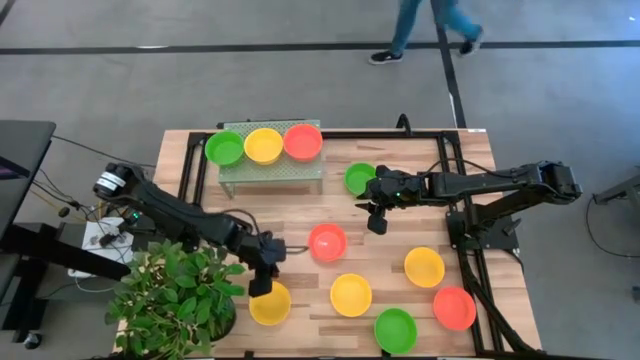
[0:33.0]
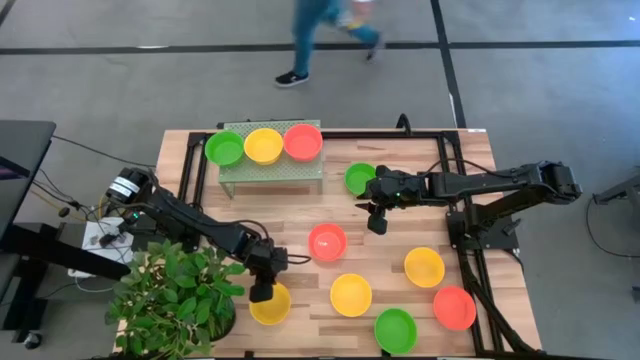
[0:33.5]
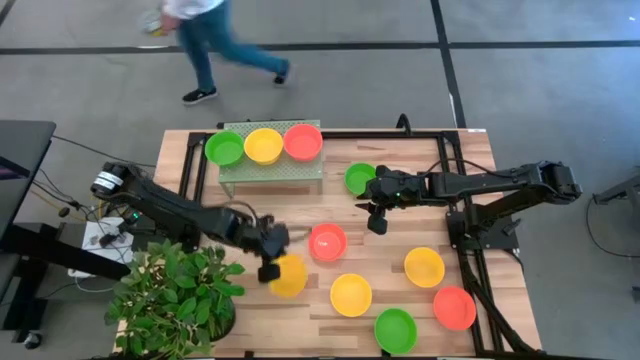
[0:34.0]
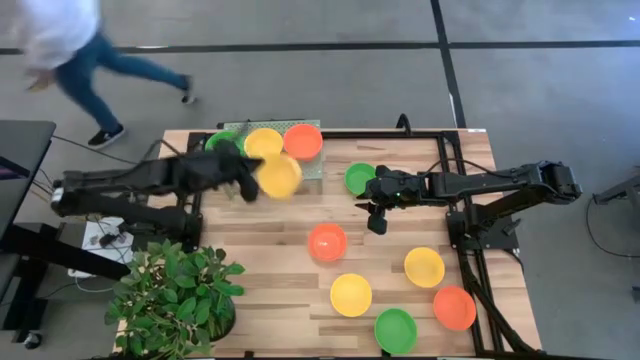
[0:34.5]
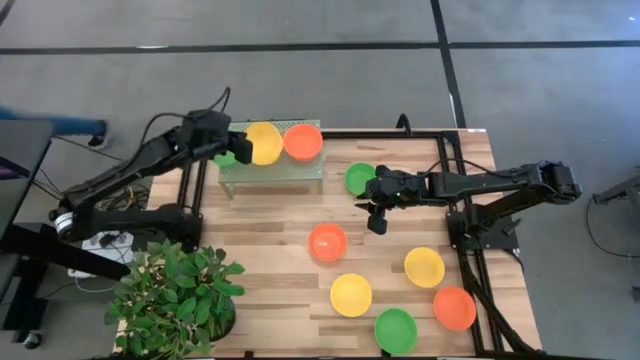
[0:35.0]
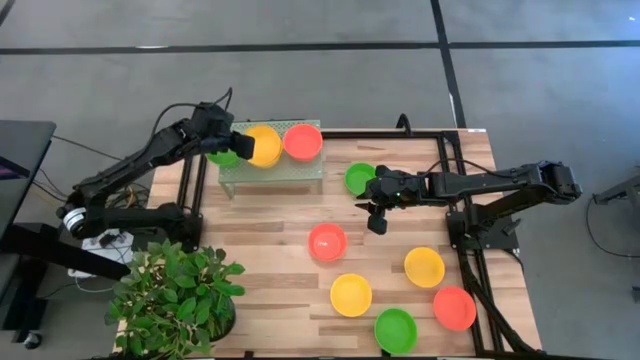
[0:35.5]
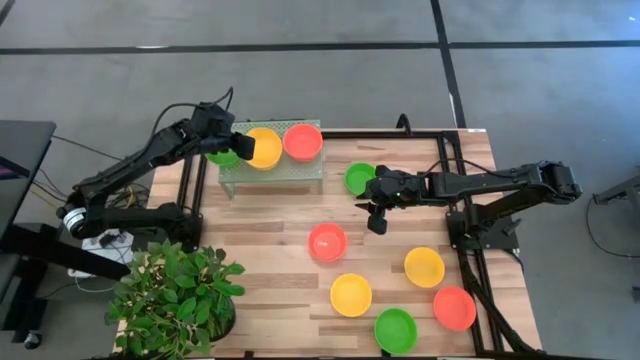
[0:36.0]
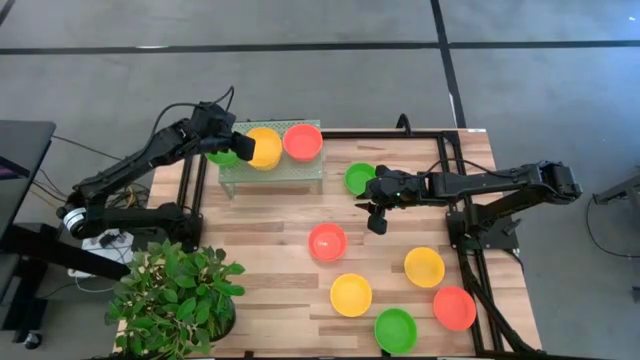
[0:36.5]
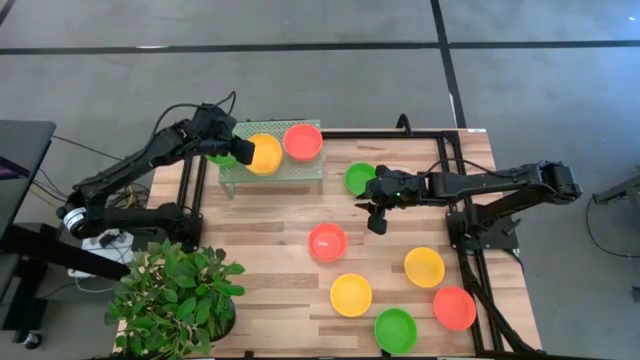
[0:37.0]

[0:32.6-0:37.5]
Task: Pick & Place Mini bowls
Stack the yellow bowl on top of the yellow bowl on the shelf

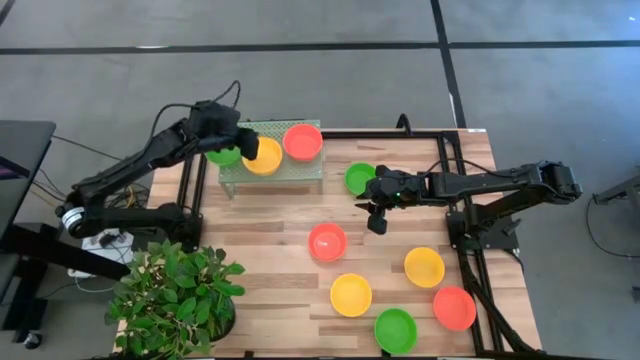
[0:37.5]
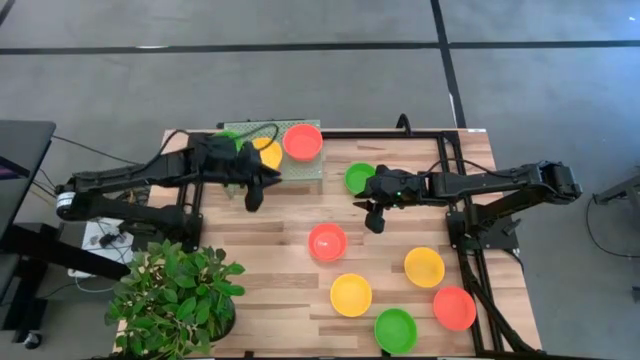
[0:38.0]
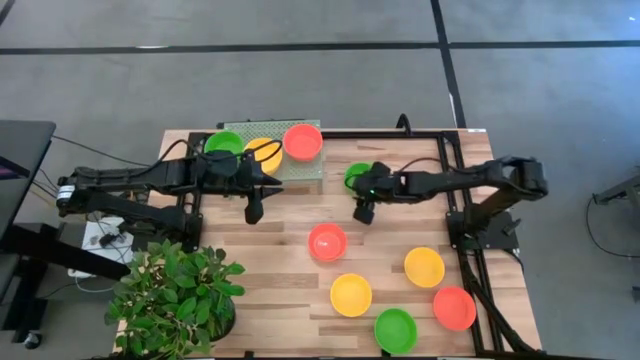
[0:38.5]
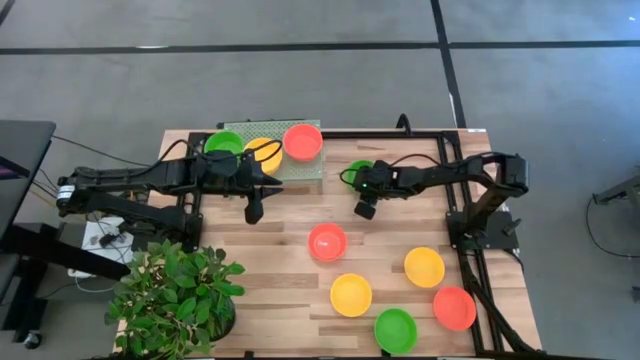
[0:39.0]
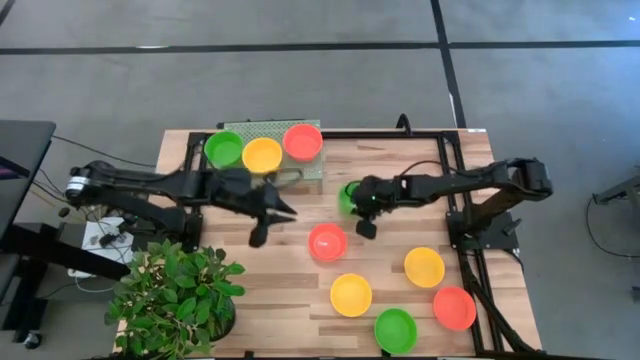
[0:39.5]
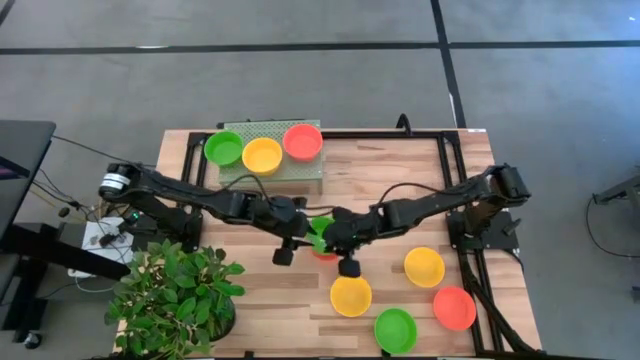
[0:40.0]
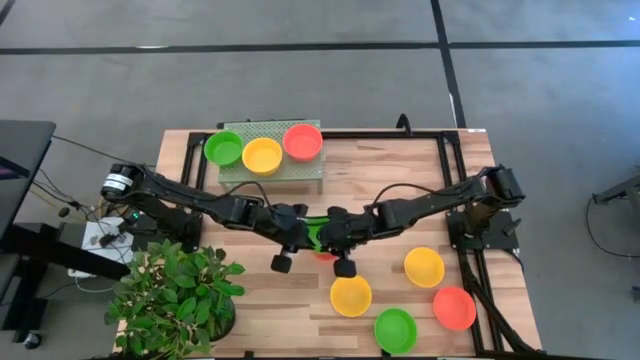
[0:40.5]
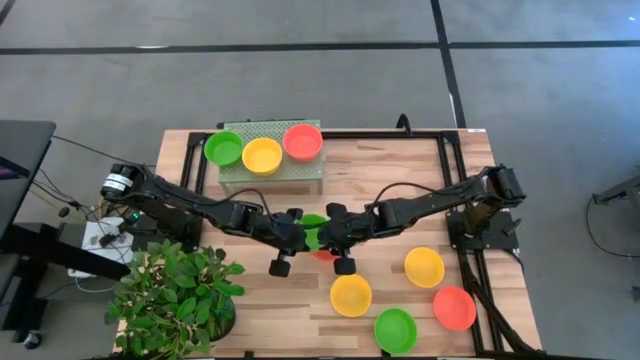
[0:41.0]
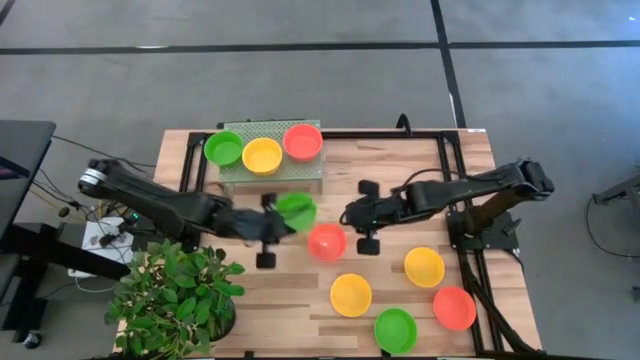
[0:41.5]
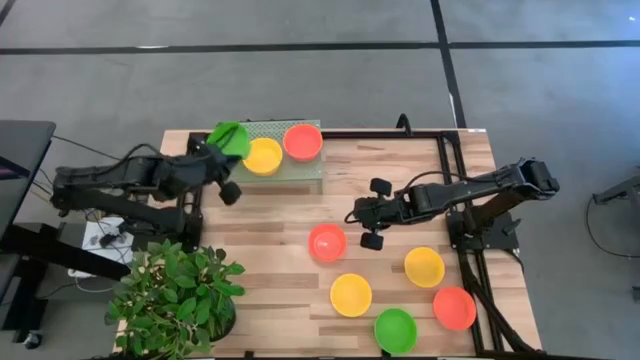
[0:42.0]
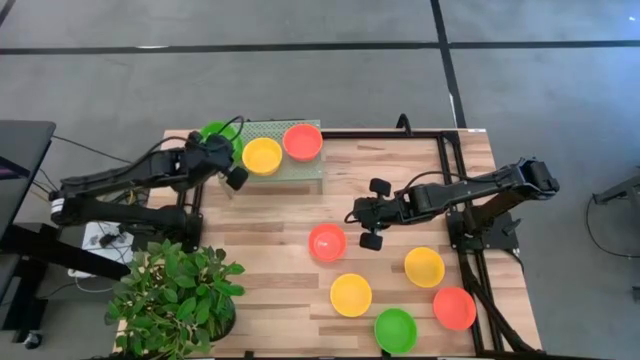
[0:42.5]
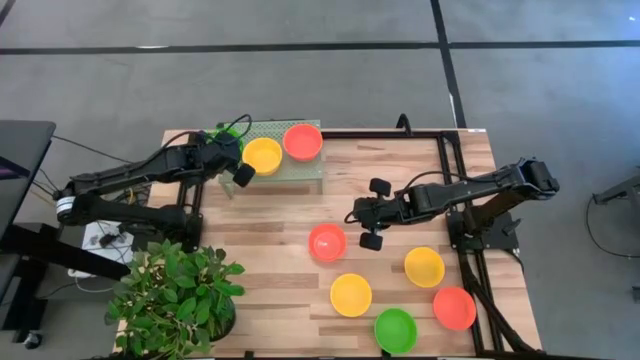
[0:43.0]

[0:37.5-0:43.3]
Stack the green bowl on top of the green bowl on the shelf

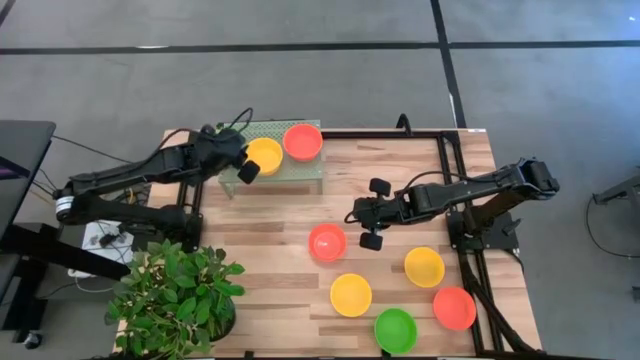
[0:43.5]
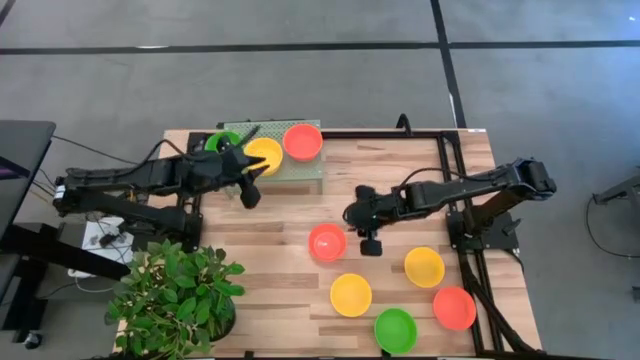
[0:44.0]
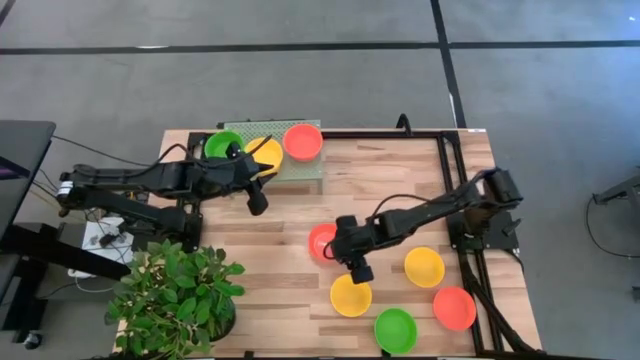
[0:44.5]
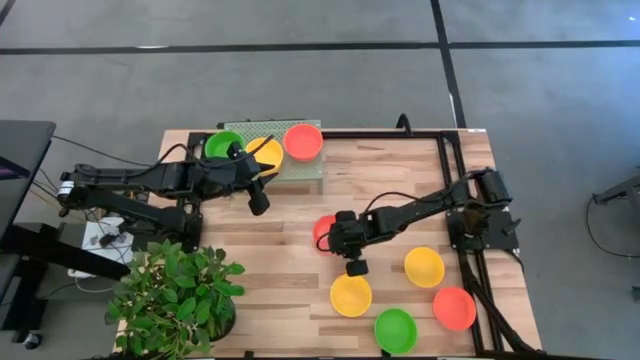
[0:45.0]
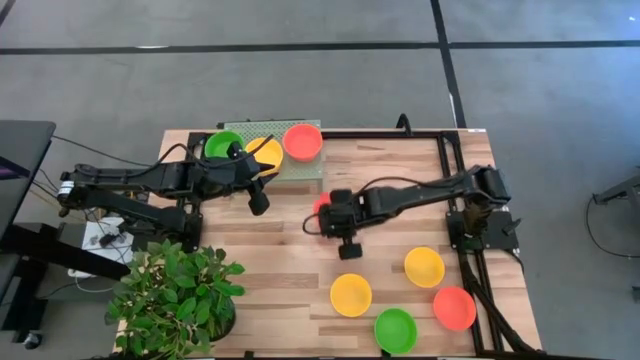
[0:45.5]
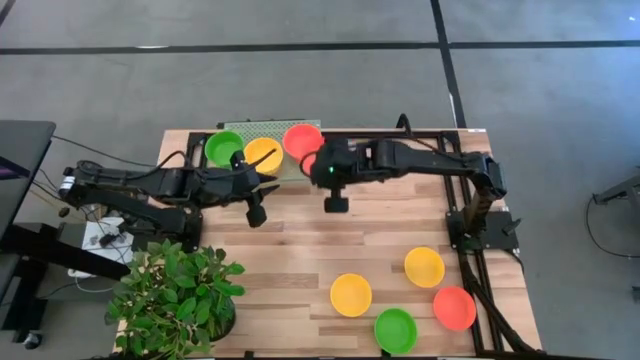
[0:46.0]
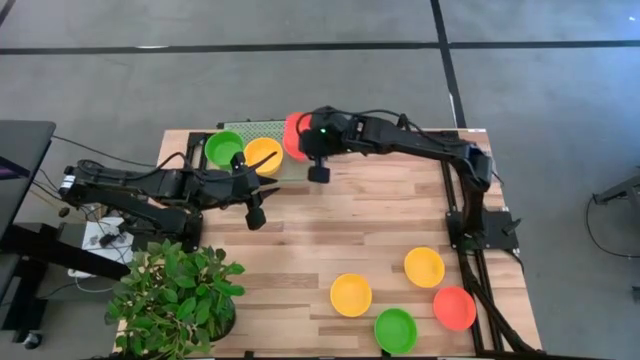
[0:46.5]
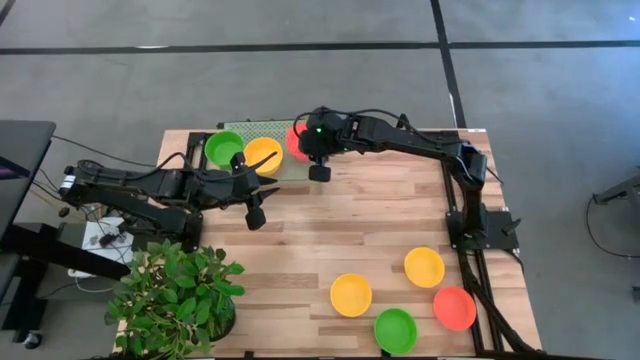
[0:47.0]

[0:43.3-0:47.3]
Stack the orange bowl on top of the stacked orange bowls on the shelf

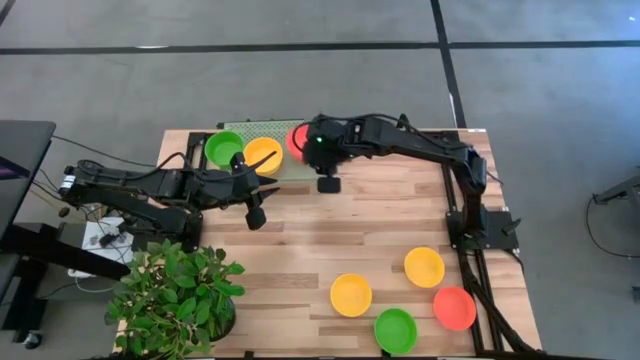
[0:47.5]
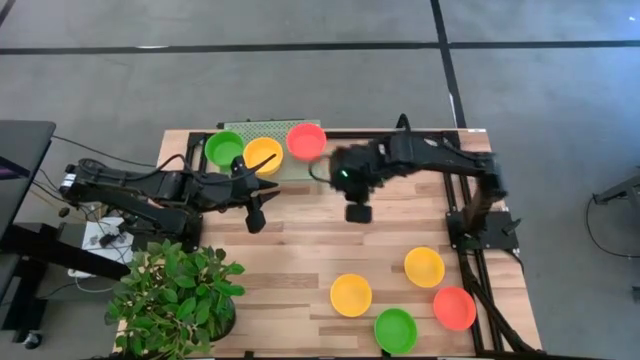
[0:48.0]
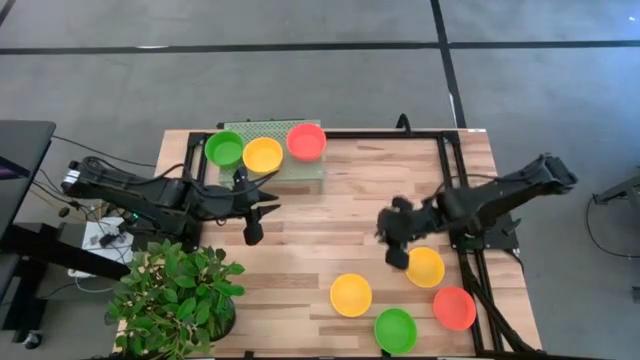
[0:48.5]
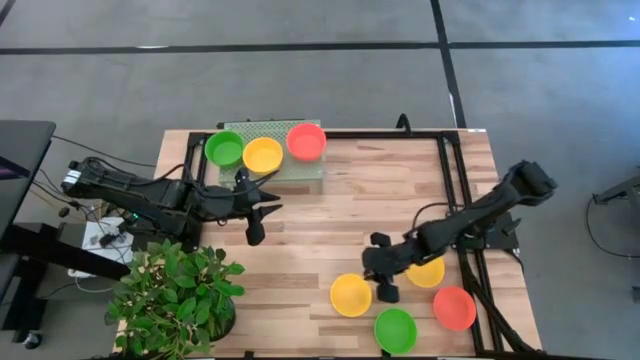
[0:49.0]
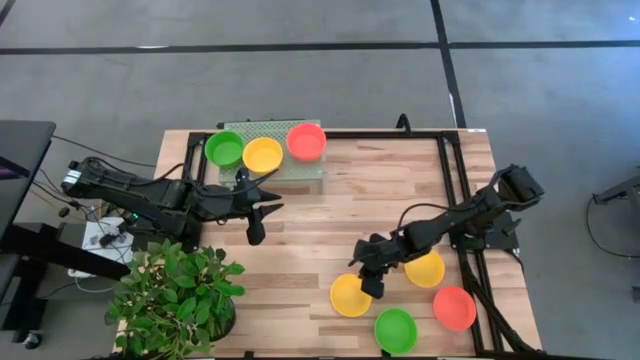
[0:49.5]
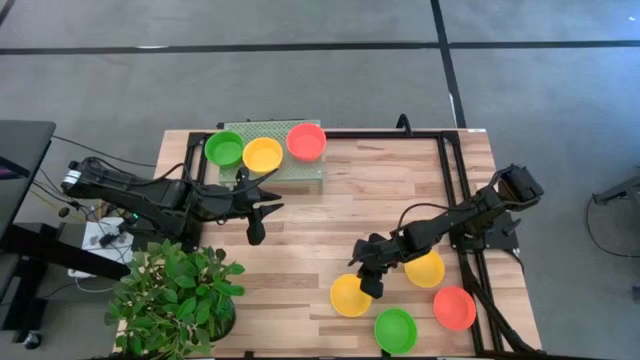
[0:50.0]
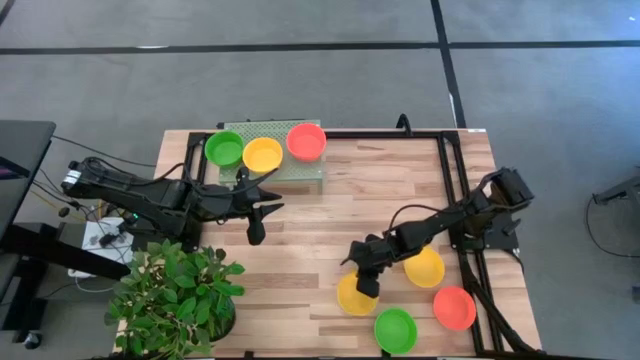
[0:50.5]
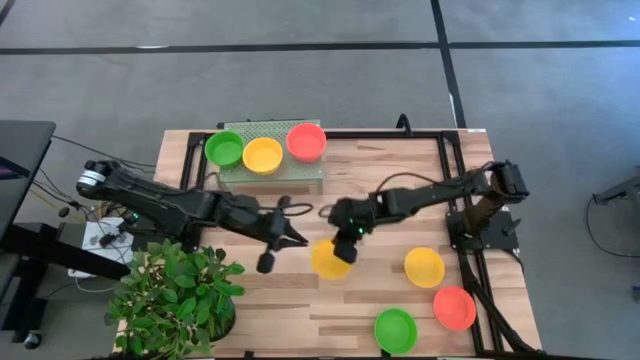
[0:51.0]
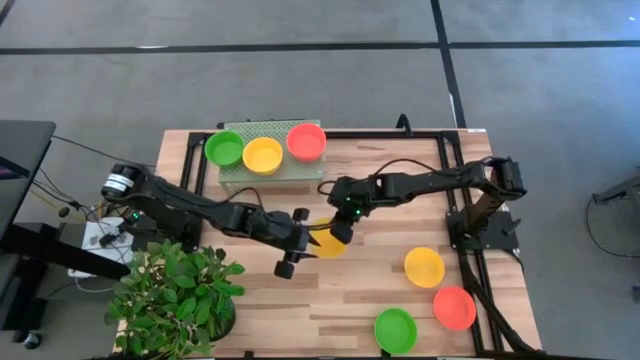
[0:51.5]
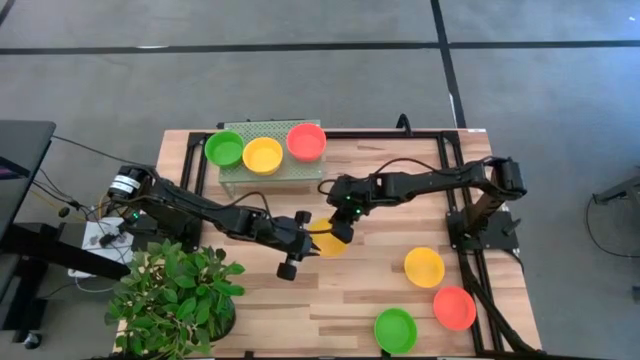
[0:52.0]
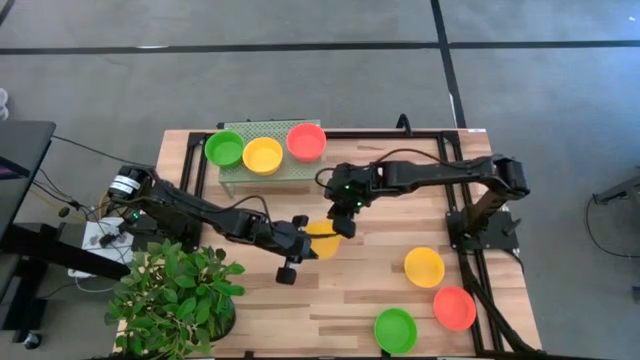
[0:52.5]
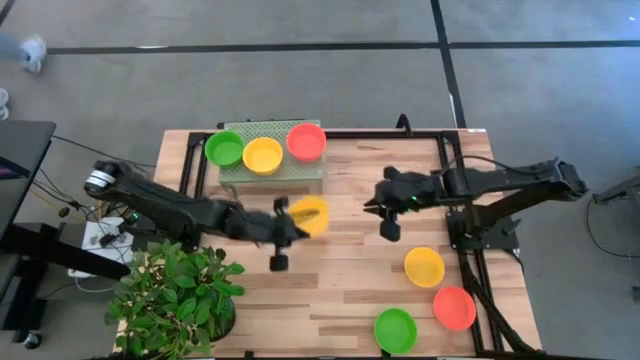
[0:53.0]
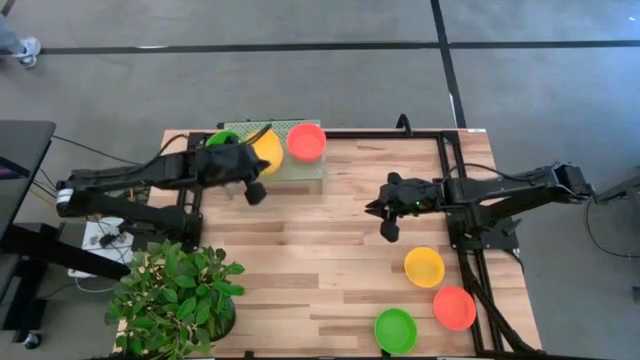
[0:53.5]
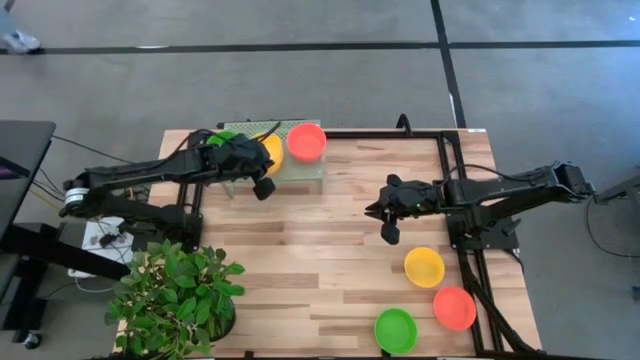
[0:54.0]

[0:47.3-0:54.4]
Stack the yellow bowl on top of the stacked yellow bowls on the shelf

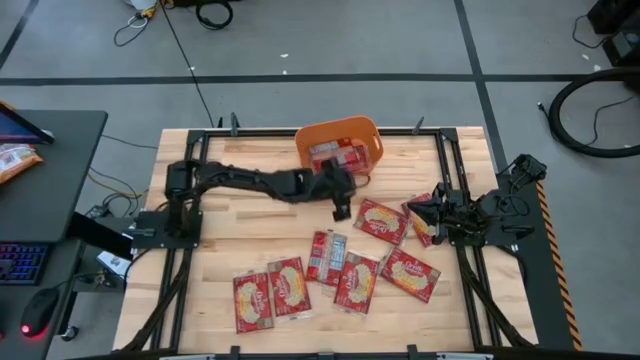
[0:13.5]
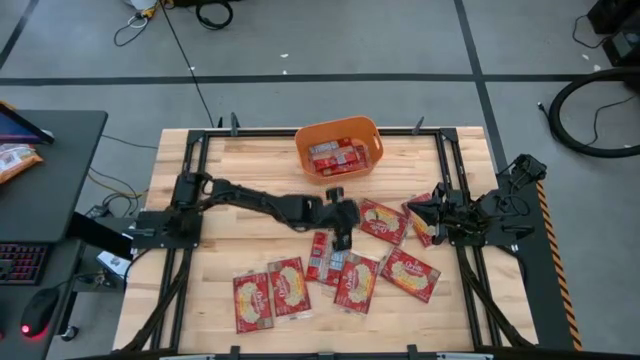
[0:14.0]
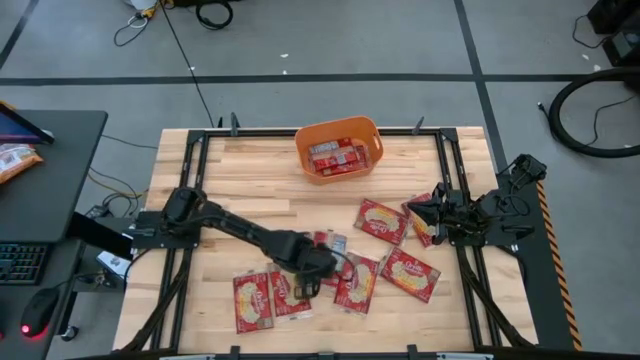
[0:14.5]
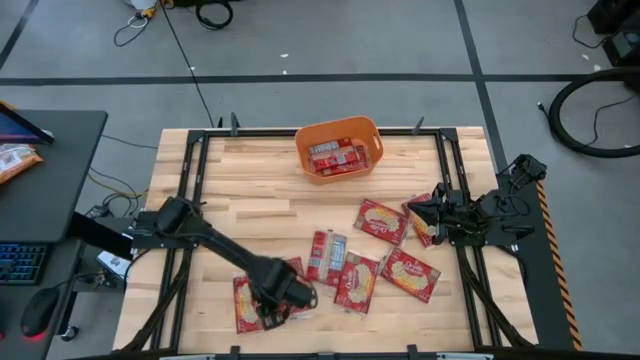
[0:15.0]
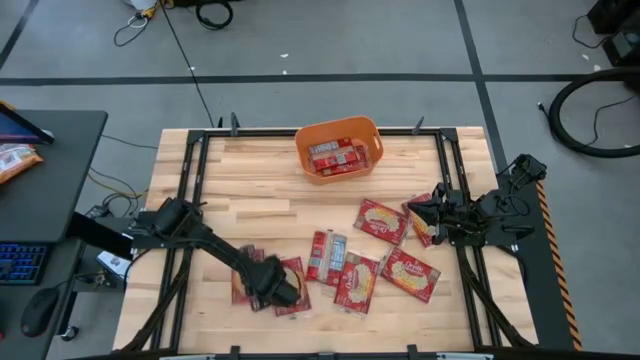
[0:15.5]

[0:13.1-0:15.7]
Task: Sort popcorn bags into baskets
Move the popcorn bag
